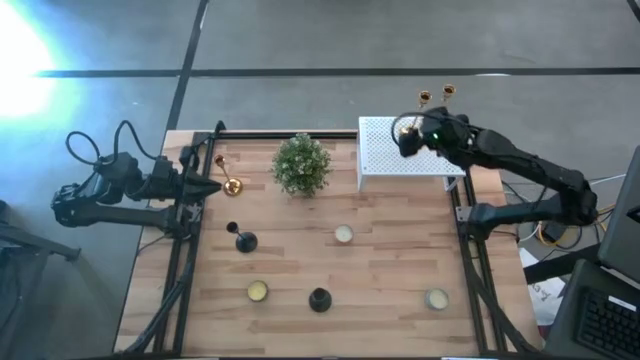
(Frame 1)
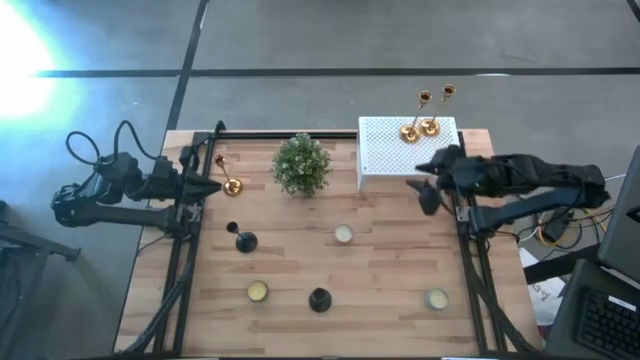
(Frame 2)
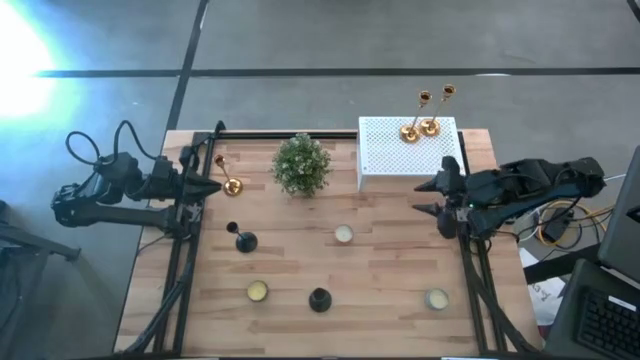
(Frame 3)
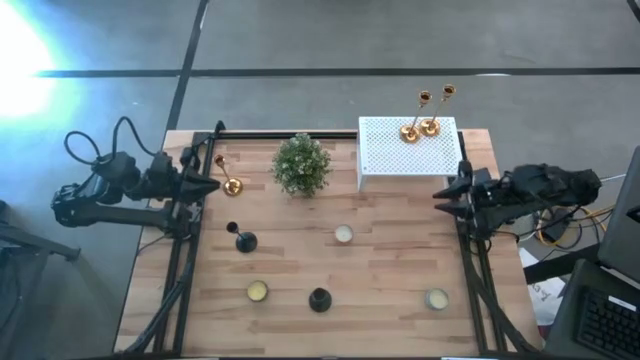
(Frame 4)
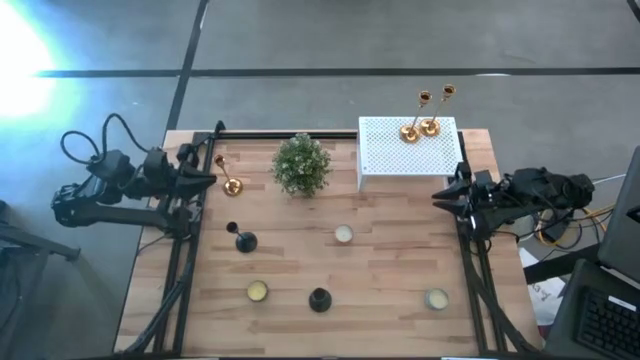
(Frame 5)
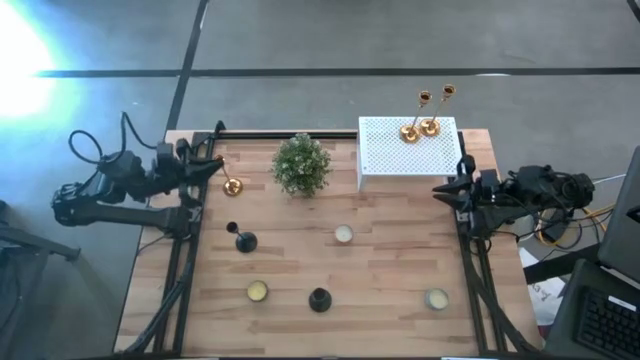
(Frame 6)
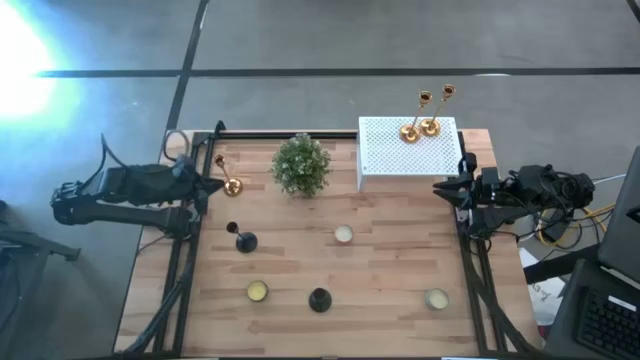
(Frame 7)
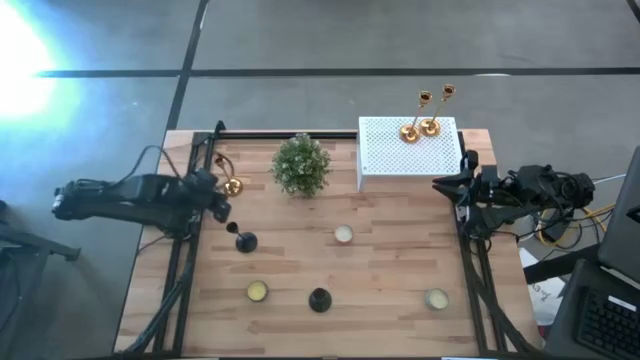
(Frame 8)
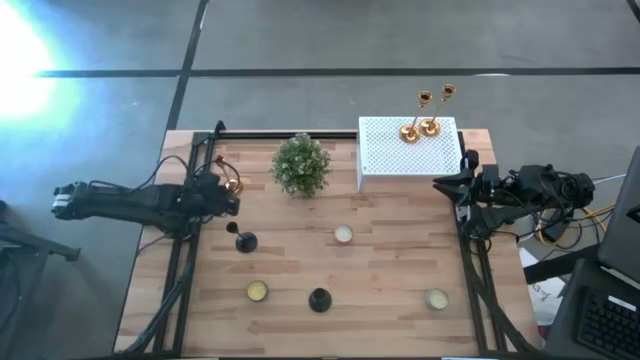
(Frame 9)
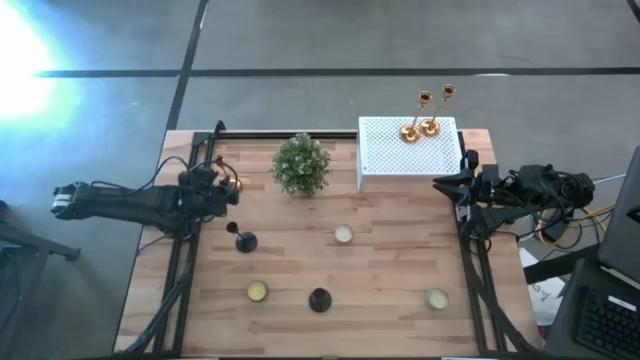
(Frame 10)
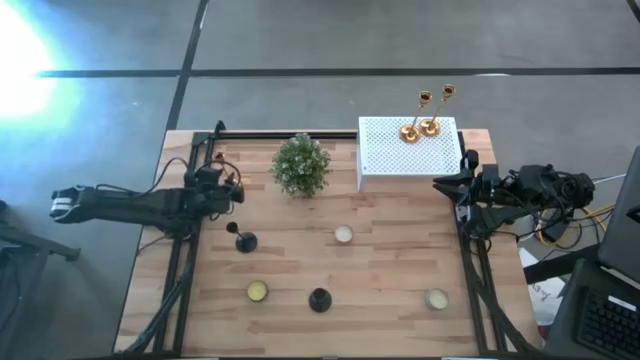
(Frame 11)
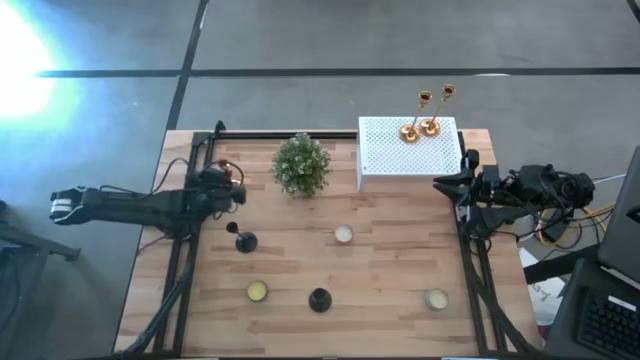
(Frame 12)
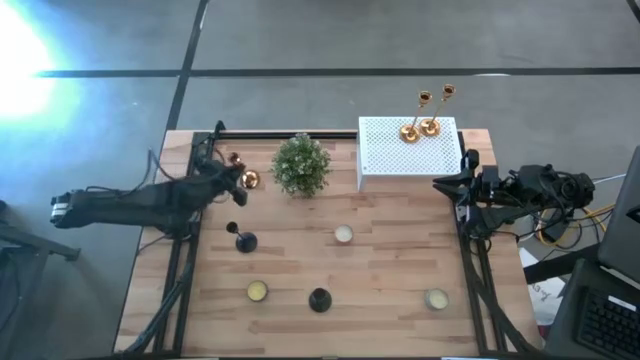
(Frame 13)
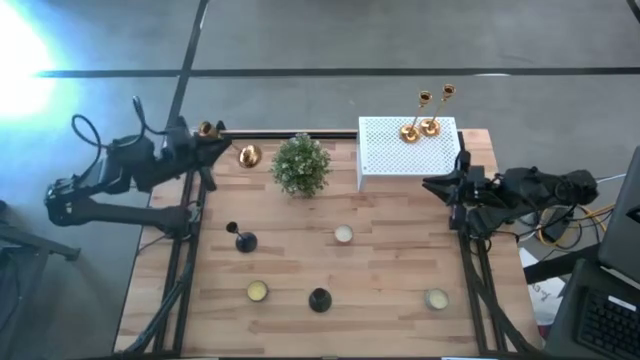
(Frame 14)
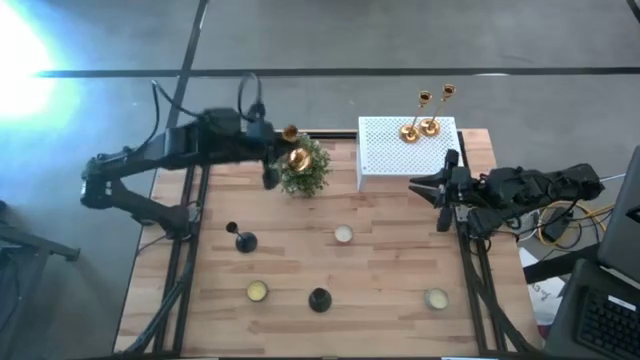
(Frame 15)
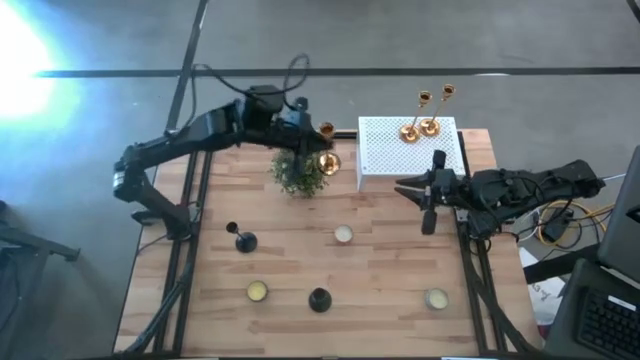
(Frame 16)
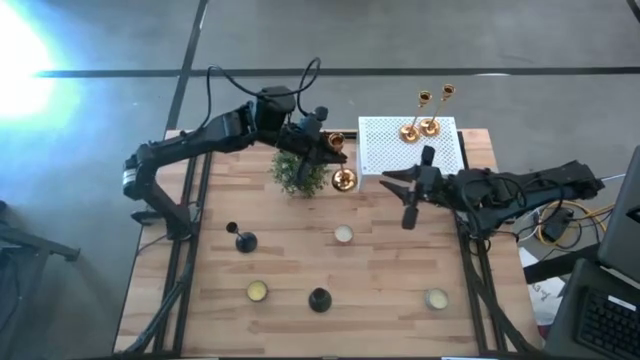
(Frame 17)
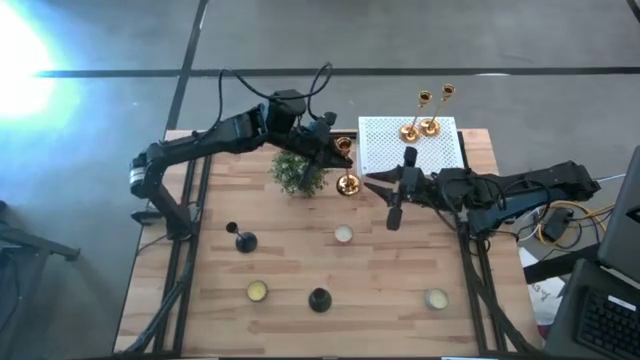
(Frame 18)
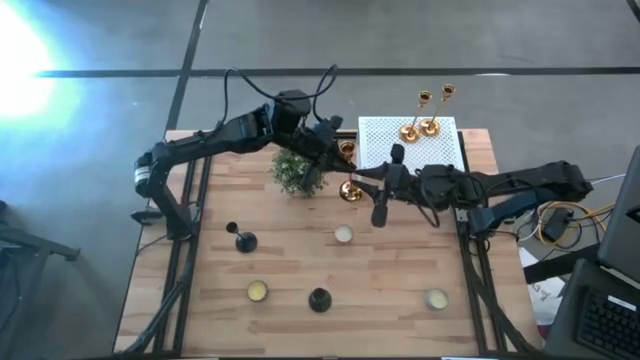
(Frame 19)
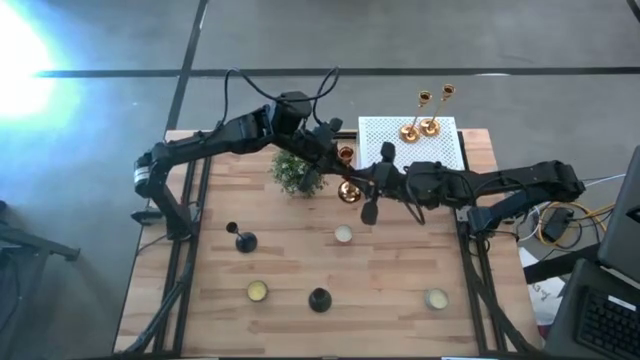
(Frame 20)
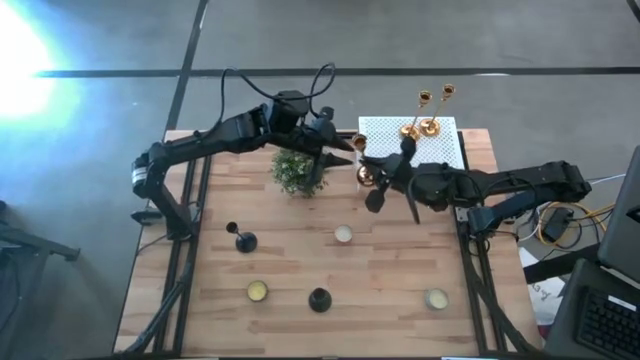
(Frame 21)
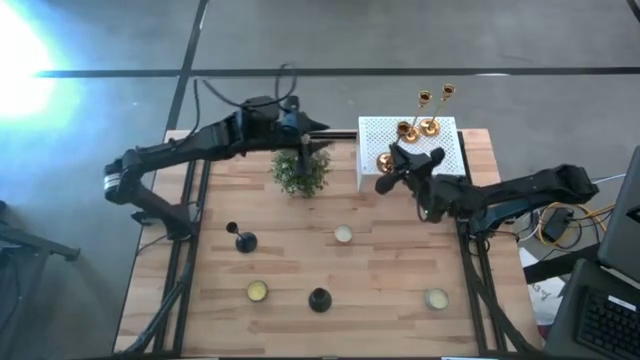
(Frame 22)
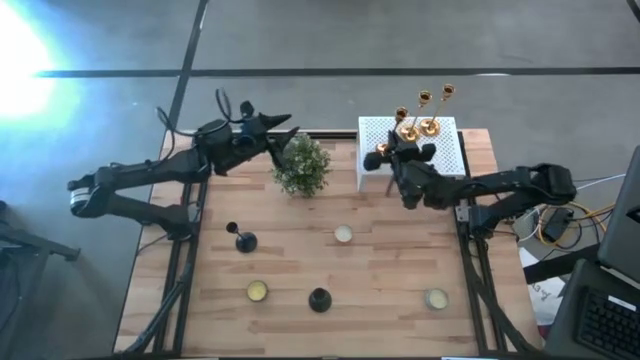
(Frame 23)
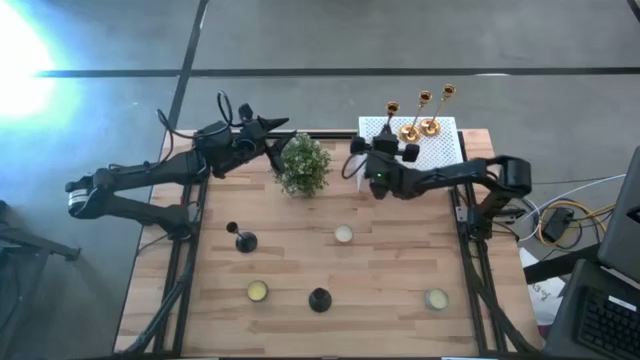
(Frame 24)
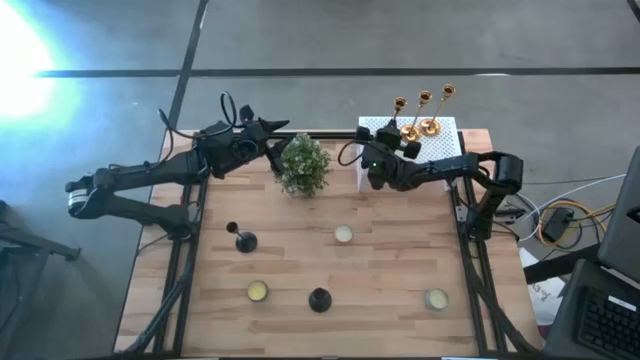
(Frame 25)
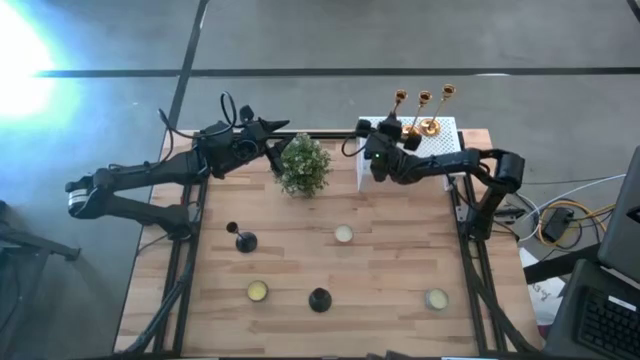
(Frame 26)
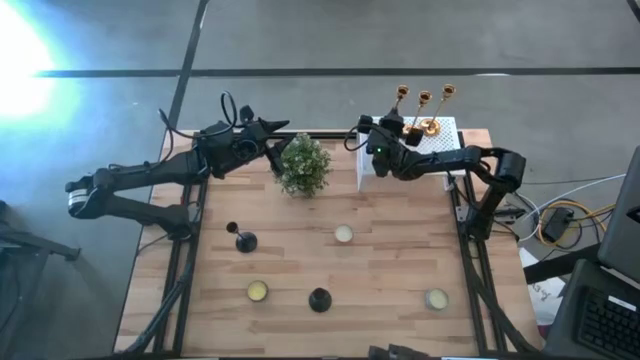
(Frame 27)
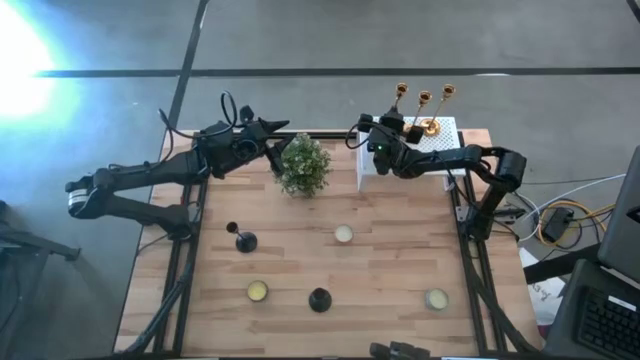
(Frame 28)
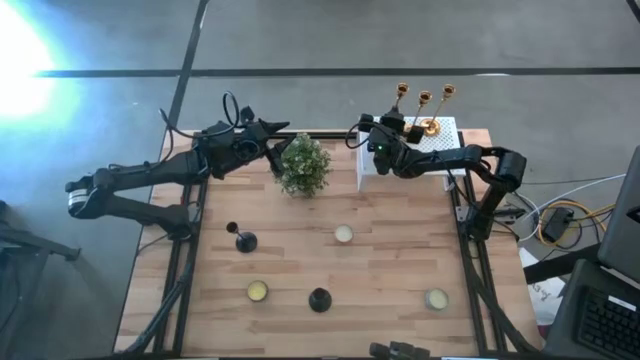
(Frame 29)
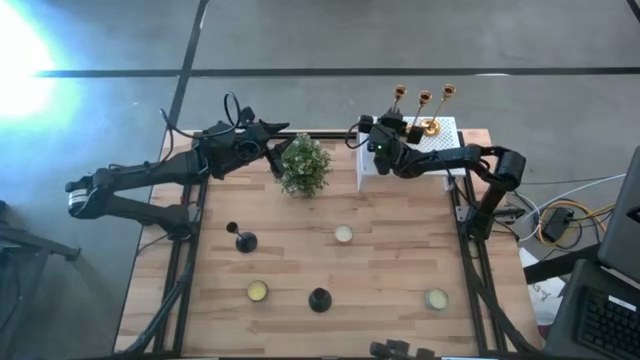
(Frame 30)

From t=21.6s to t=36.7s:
Task: Pick & Place candle stick holders
Put the gold candle holder on the shelf
